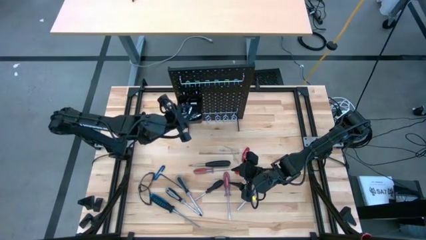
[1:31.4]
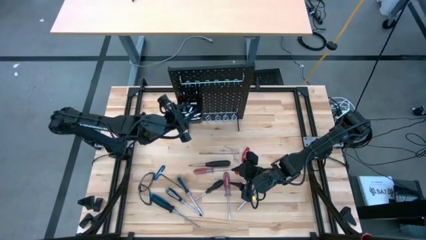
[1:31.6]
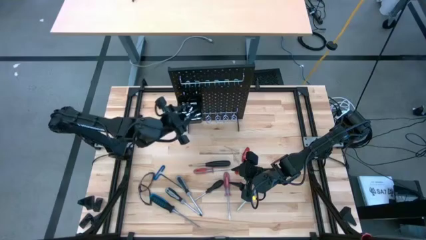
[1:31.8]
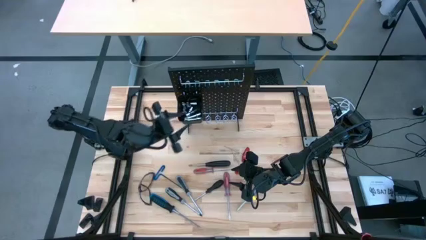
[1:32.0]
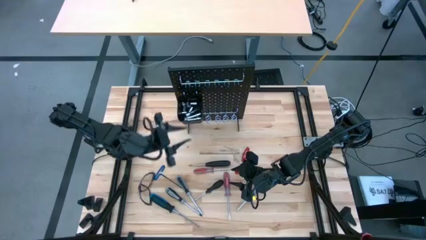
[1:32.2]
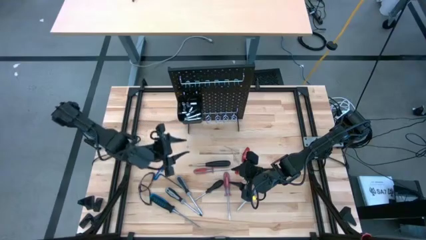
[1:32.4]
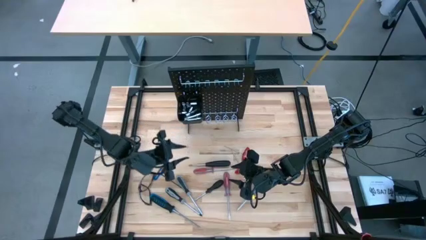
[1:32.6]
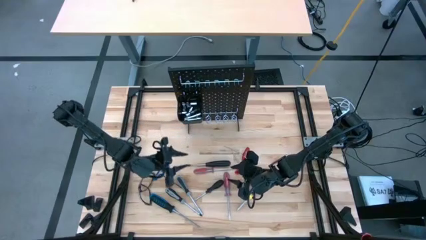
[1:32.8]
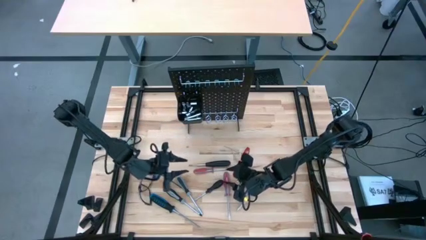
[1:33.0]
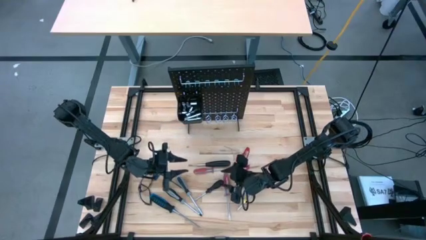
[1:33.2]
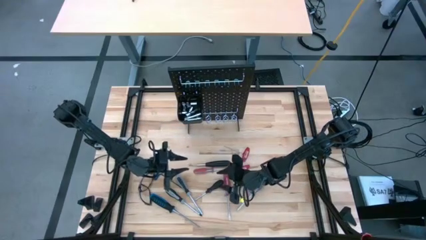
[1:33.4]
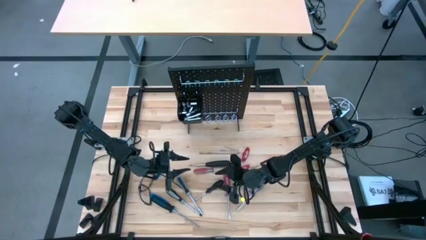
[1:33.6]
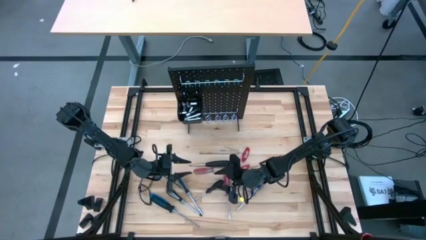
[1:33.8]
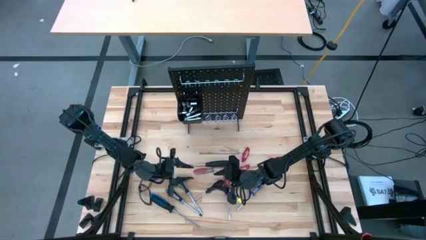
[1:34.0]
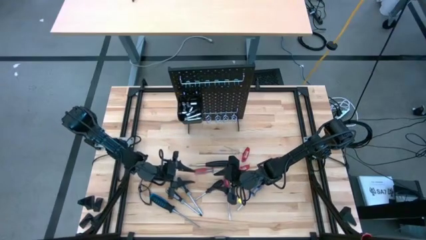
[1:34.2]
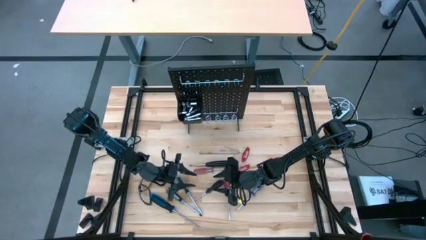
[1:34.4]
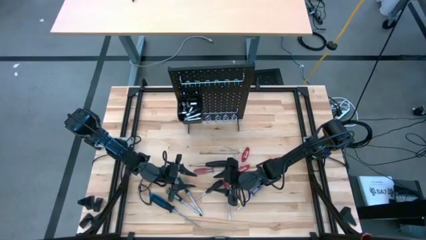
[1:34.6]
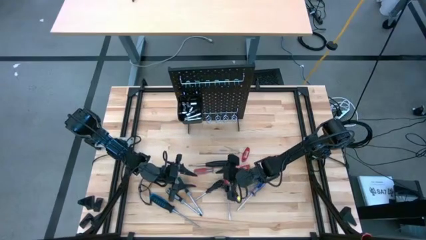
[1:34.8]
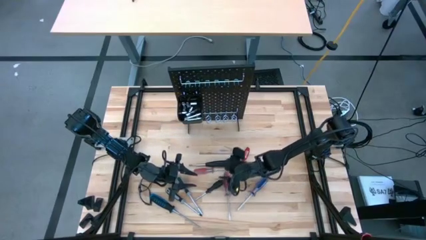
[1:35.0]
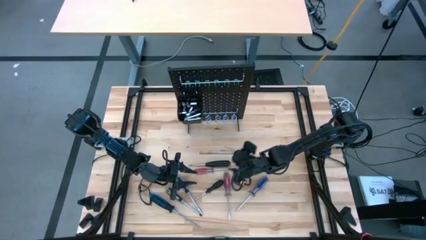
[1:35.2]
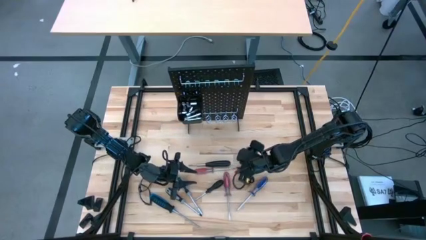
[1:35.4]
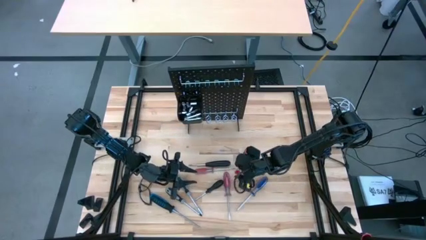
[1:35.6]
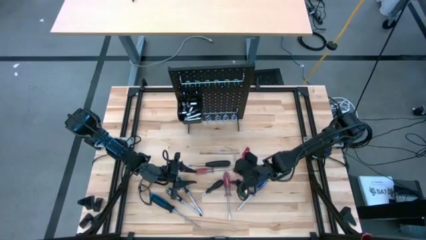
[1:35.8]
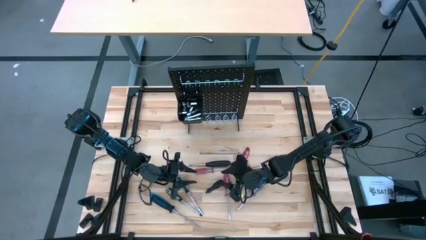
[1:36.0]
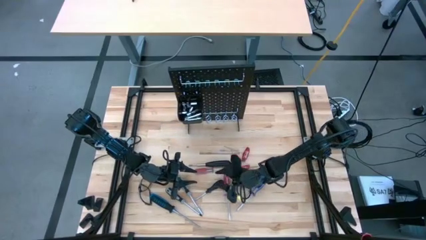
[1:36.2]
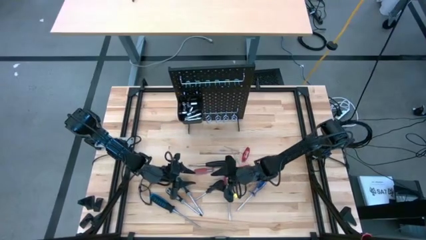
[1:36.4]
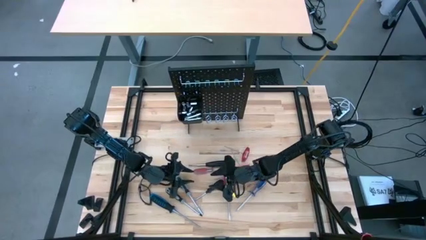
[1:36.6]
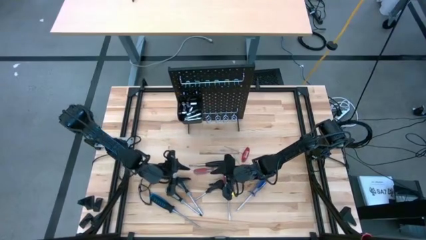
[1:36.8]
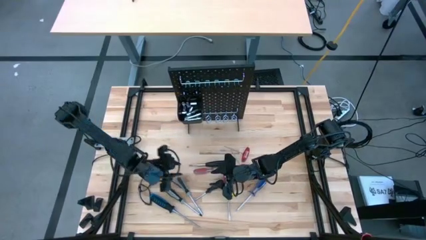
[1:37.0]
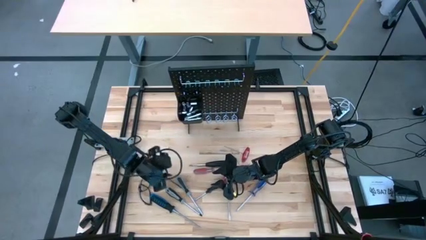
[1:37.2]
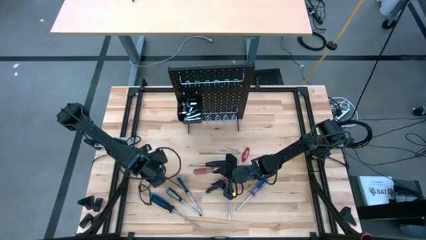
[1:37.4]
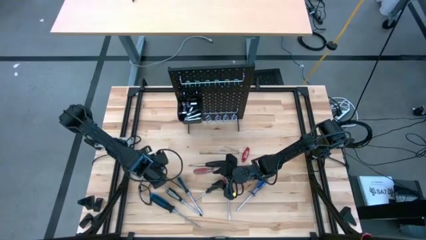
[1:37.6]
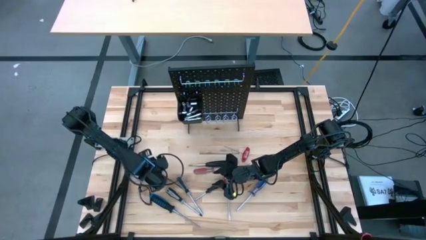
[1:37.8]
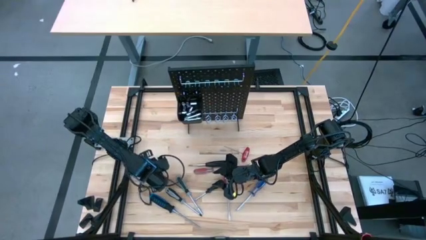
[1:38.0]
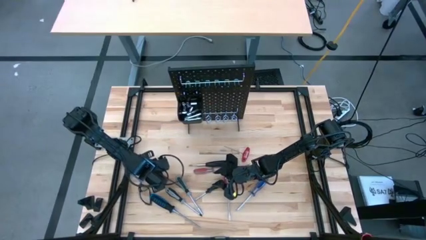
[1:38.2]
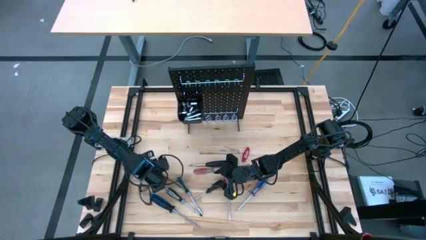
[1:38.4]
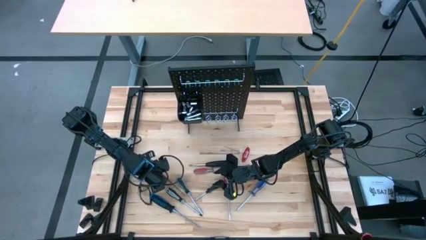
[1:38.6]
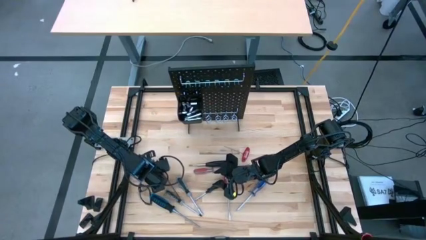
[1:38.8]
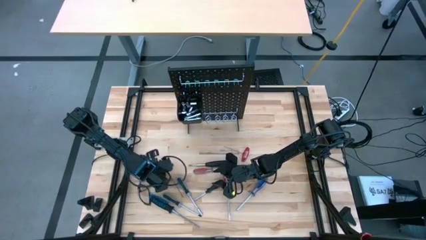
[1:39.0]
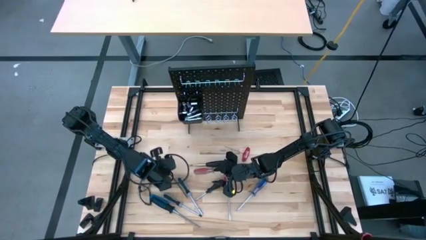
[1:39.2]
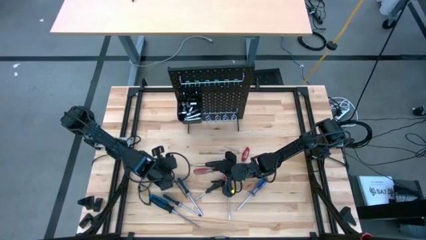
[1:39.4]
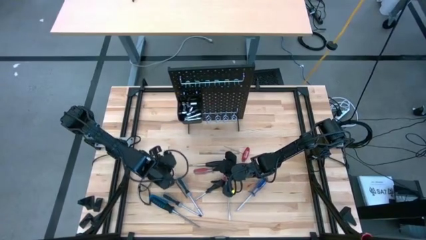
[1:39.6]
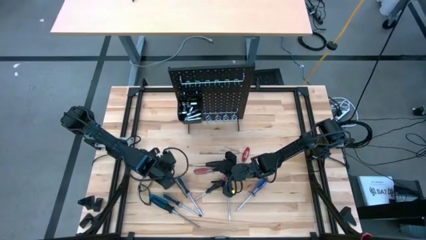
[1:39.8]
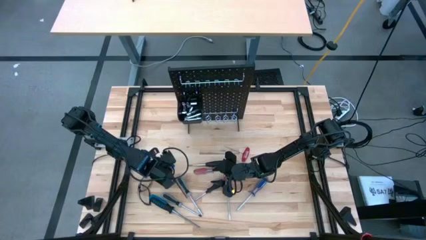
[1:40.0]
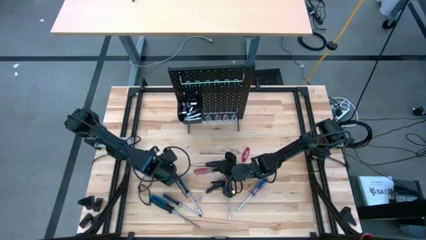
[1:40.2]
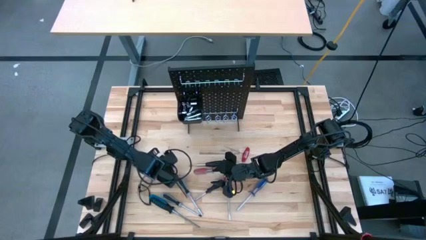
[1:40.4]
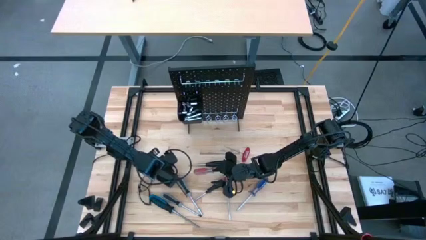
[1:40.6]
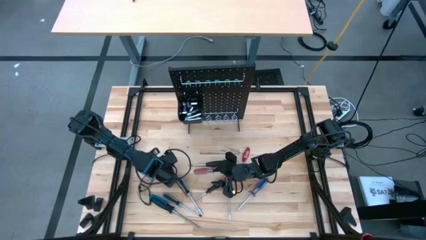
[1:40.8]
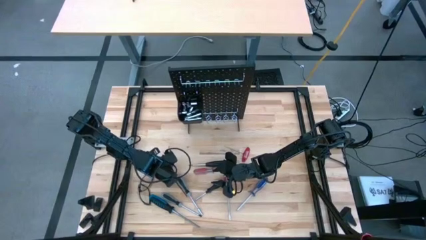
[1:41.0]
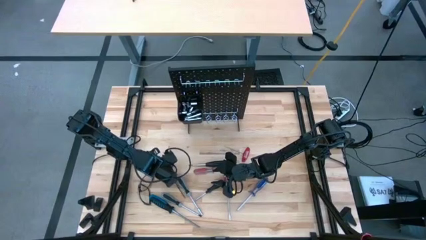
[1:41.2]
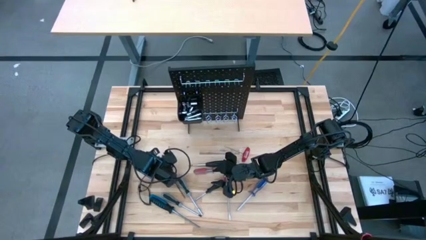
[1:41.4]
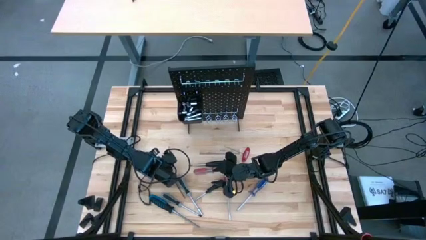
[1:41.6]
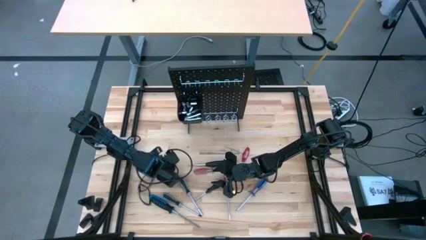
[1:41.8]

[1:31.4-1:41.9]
Task: Hang tools onto peg board
Hang the pick tool on the pegboard

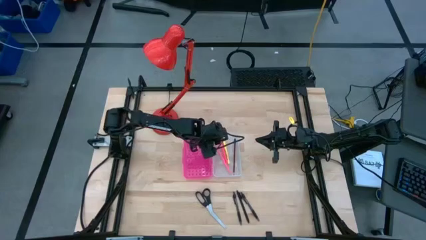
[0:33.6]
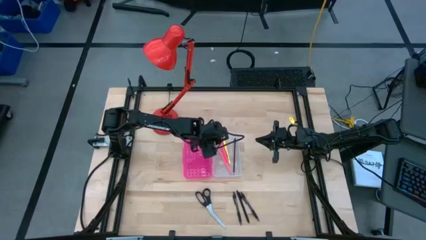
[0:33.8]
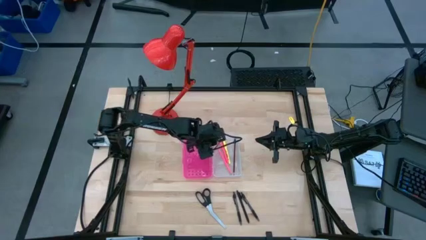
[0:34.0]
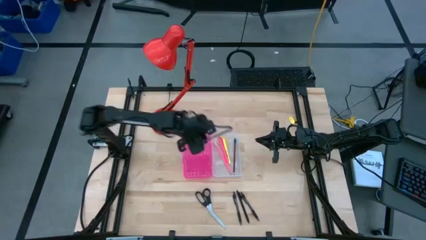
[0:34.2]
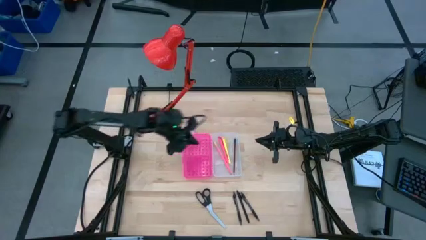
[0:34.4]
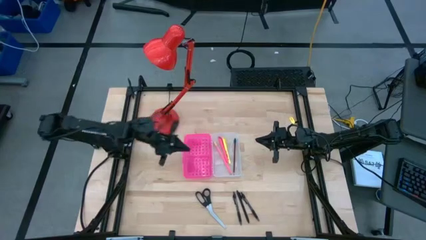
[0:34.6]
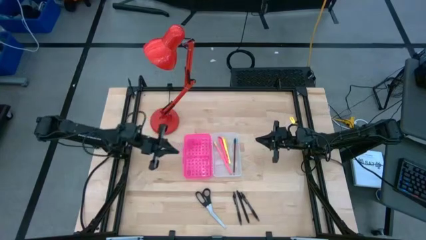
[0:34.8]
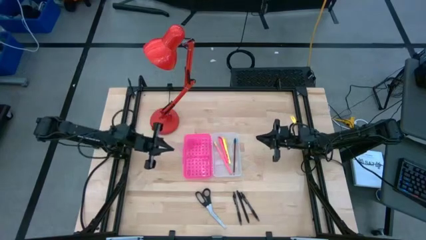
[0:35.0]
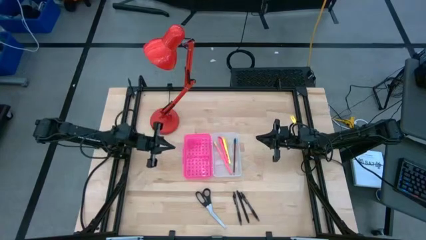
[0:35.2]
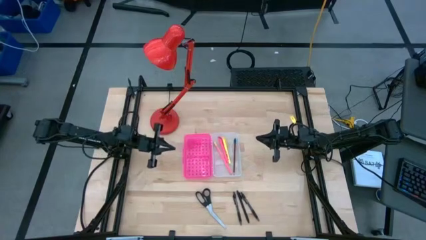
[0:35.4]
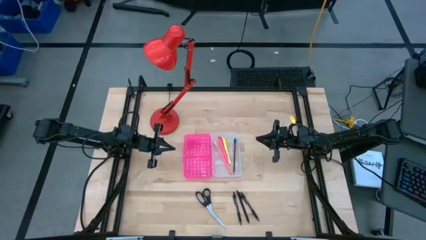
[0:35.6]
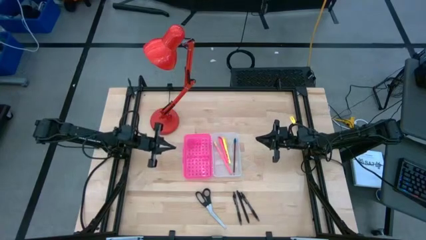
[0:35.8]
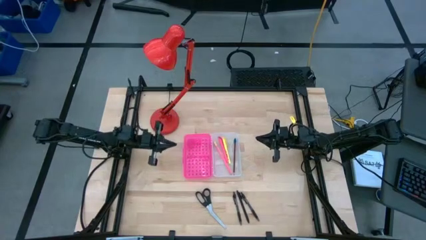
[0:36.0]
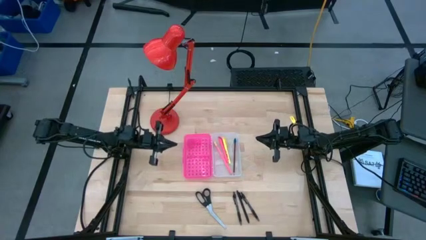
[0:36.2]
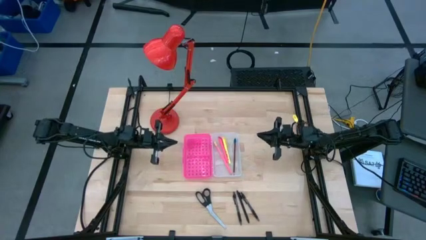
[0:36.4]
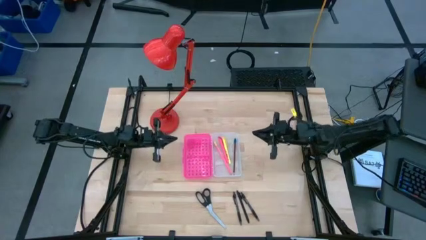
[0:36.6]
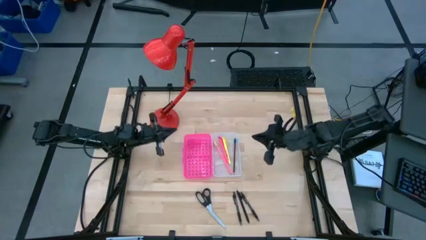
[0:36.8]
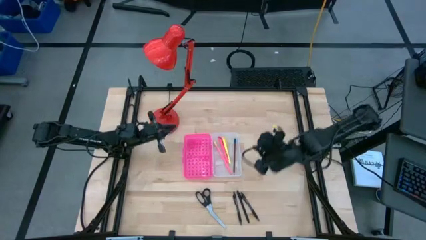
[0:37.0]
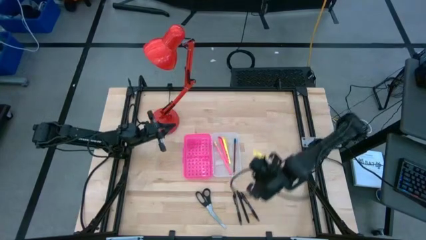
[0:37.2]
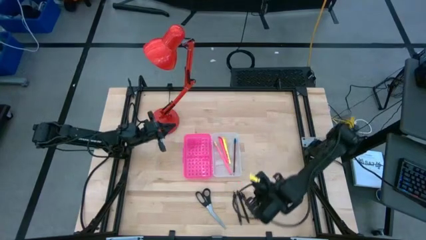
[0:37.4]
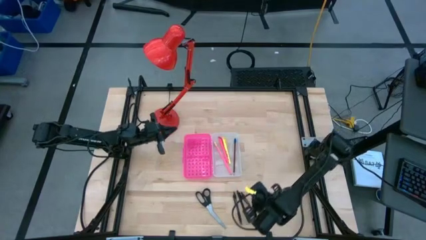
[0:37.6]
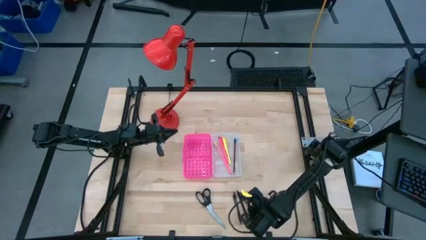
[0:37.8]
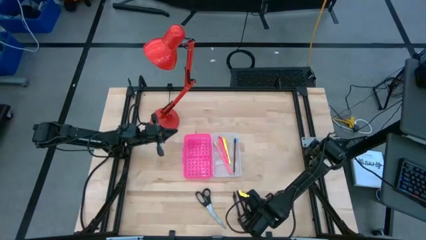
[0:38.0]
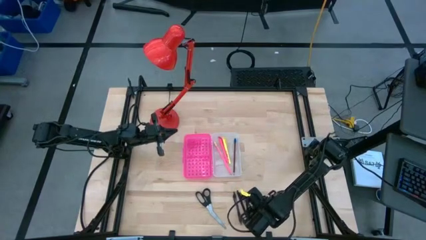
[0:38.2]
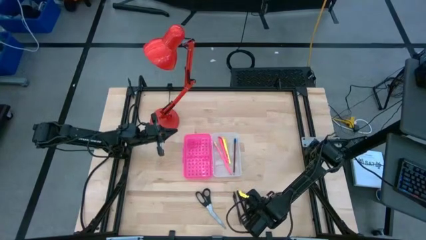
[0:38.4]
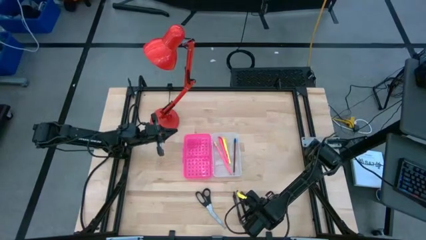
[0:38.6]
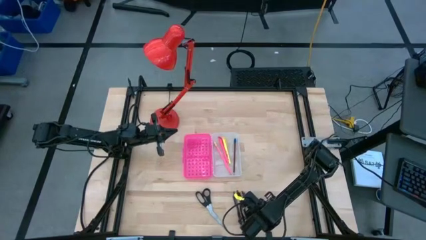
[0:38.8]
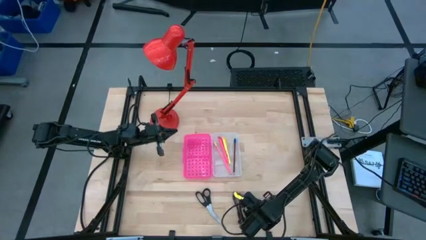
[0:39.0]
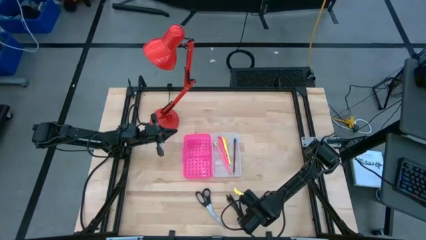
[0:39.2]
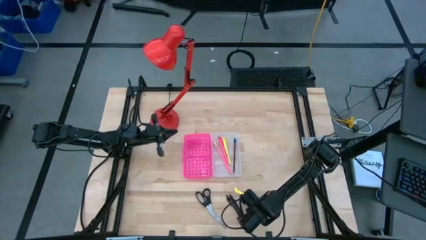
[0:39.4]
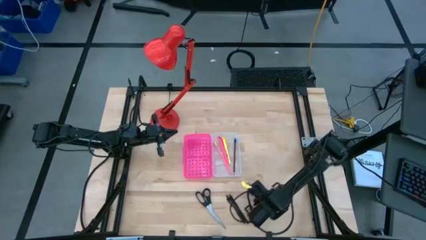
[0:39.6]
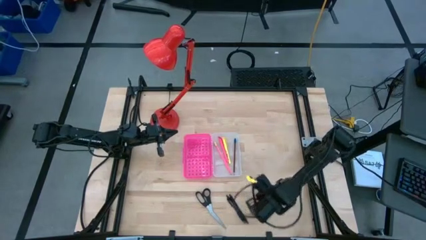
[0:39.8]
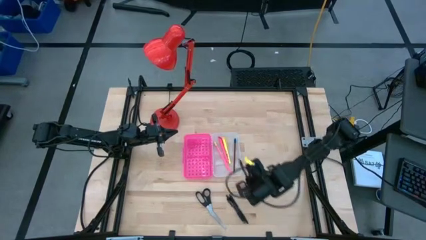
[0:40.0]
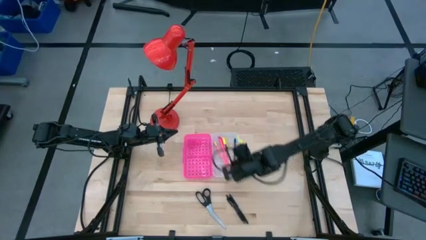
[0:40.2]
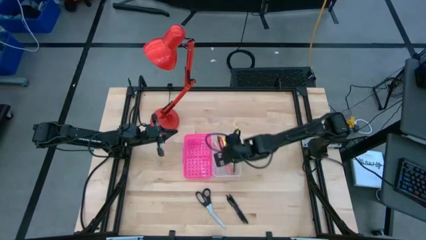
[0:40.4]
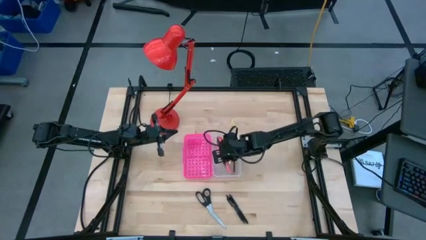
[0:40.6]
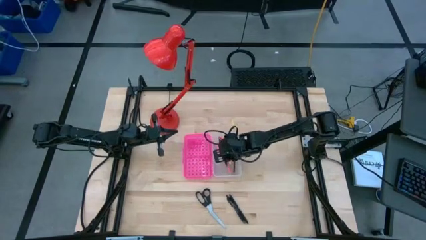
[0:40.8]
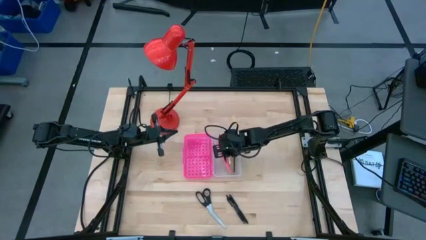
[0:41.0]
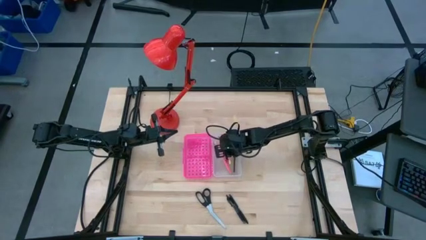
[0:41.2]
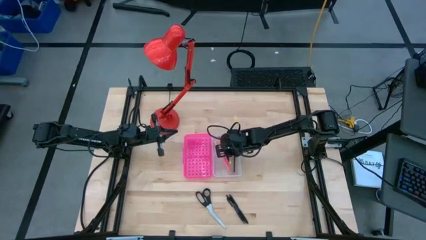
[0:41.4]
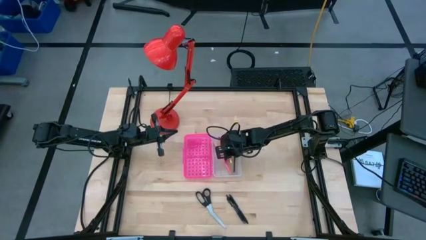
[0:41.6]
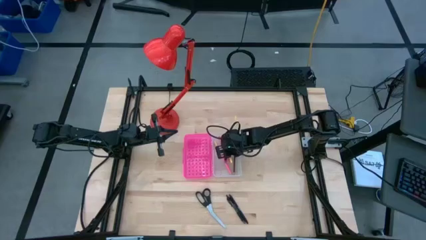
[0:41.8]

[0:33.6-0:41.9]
Task: Pick & place school supplies into a supply box
Put the right black pen into the pink supply box
